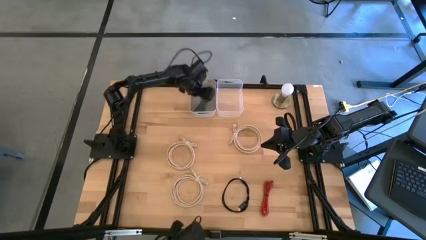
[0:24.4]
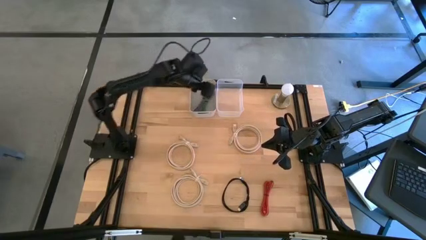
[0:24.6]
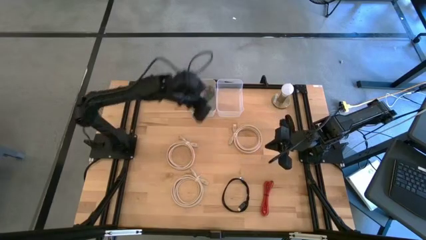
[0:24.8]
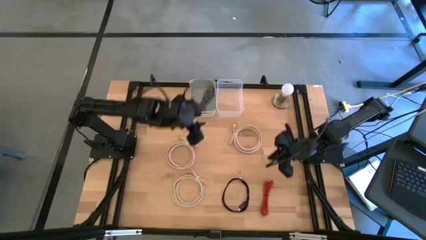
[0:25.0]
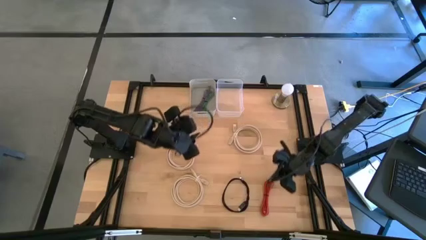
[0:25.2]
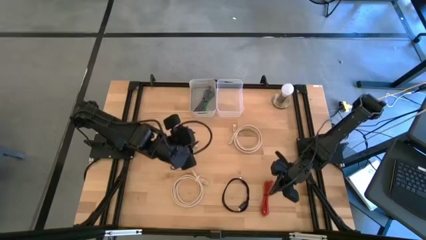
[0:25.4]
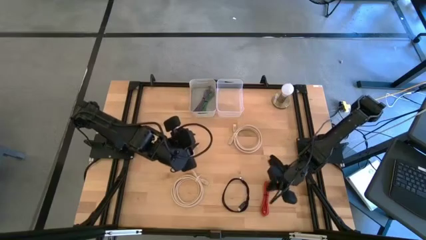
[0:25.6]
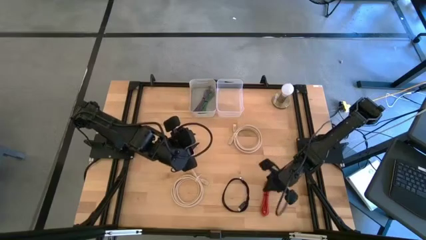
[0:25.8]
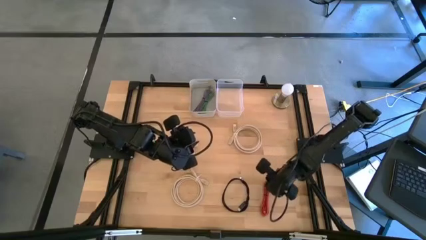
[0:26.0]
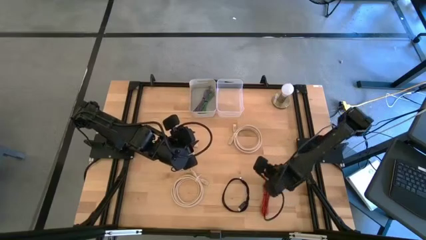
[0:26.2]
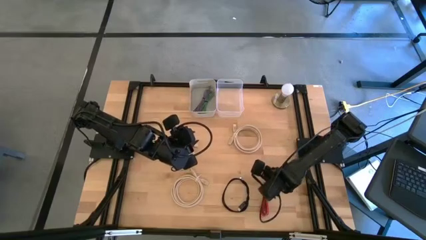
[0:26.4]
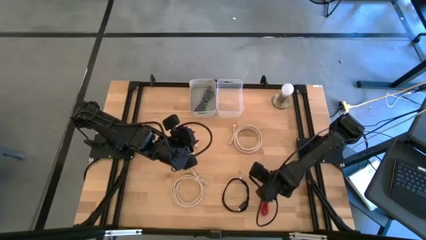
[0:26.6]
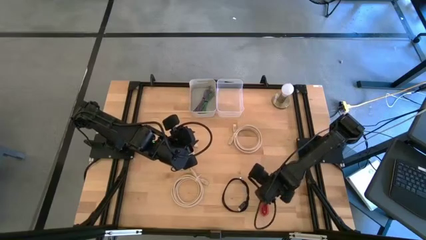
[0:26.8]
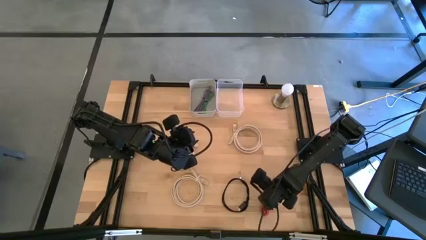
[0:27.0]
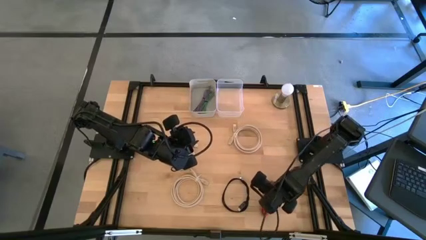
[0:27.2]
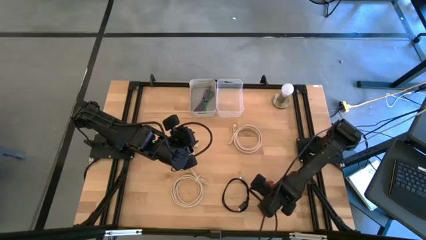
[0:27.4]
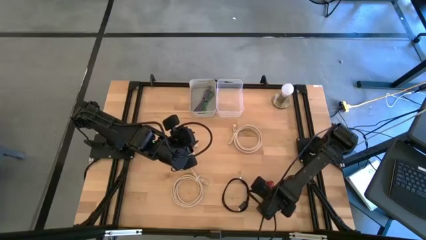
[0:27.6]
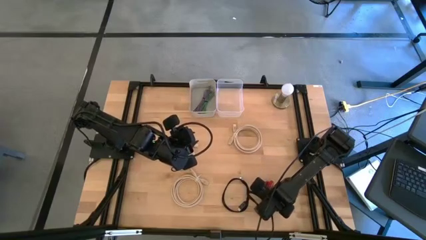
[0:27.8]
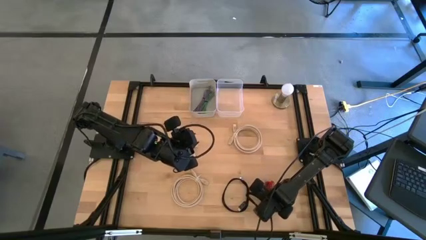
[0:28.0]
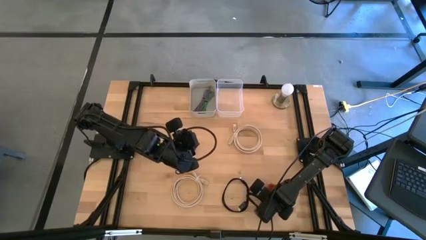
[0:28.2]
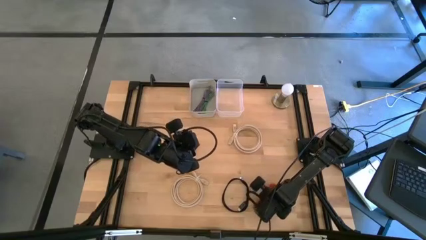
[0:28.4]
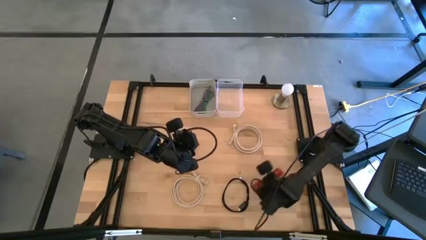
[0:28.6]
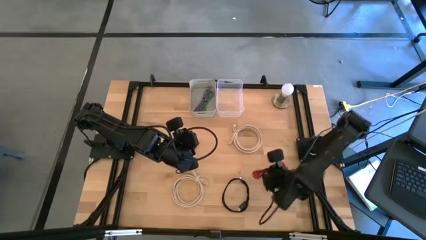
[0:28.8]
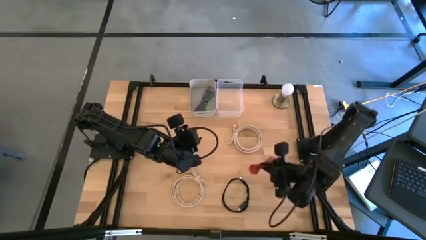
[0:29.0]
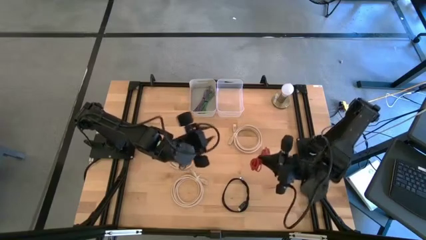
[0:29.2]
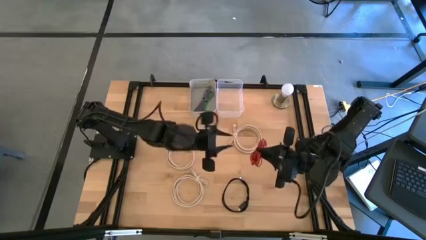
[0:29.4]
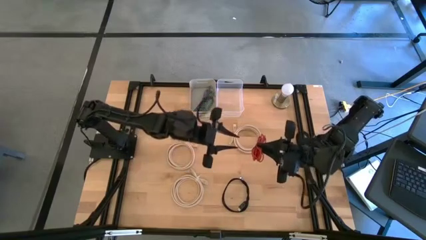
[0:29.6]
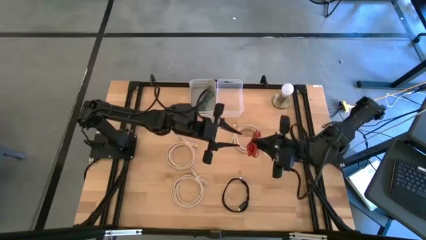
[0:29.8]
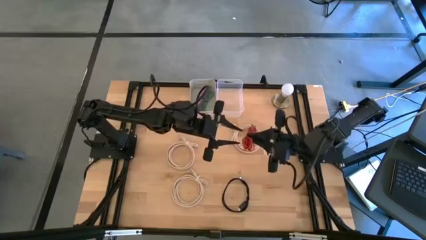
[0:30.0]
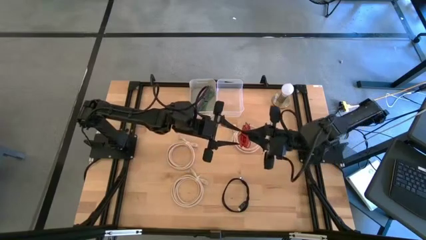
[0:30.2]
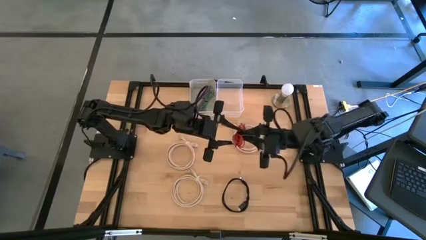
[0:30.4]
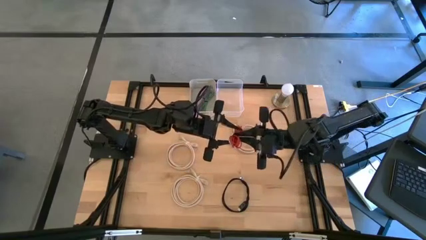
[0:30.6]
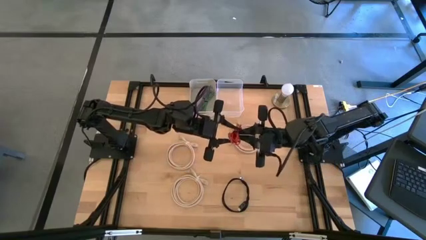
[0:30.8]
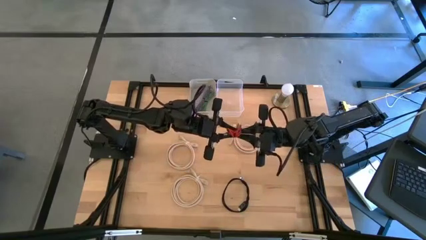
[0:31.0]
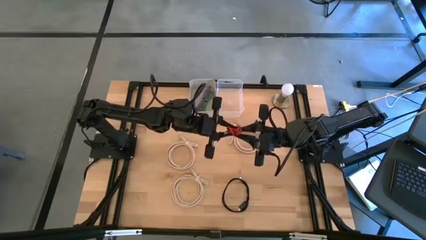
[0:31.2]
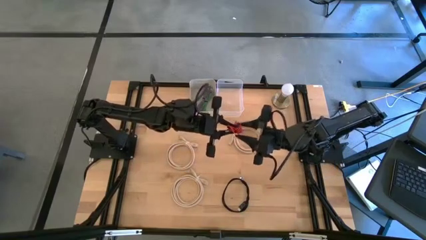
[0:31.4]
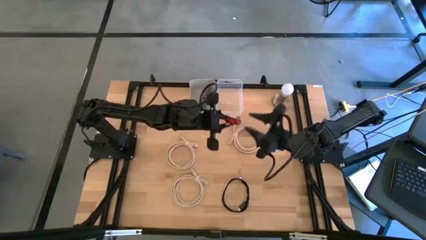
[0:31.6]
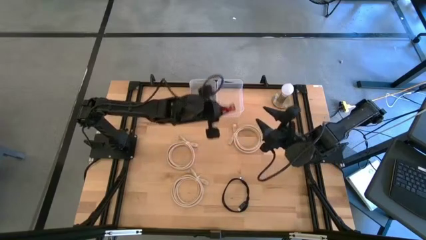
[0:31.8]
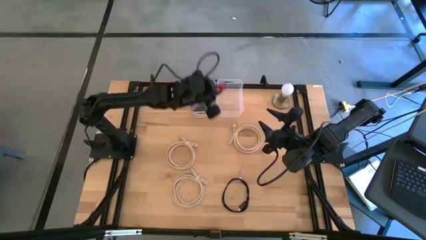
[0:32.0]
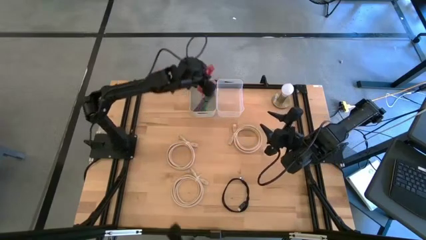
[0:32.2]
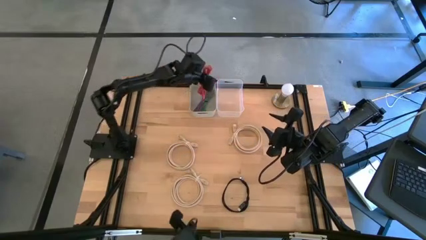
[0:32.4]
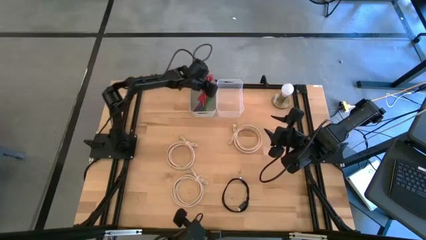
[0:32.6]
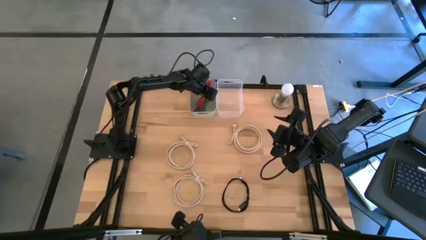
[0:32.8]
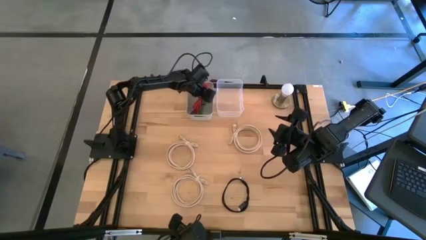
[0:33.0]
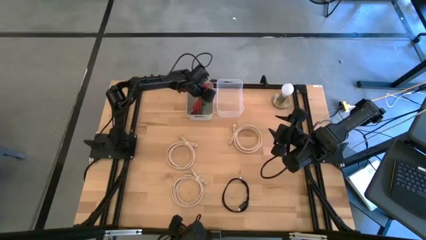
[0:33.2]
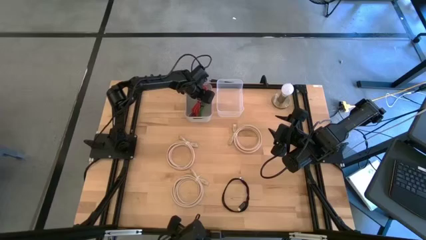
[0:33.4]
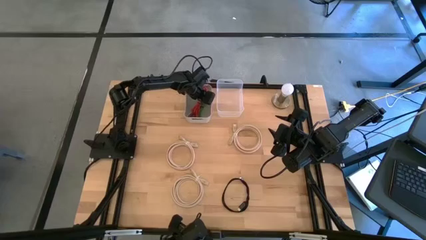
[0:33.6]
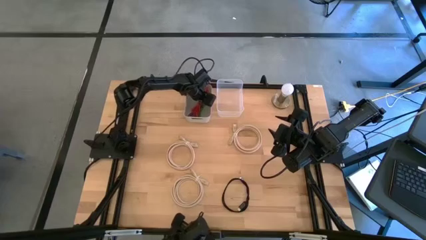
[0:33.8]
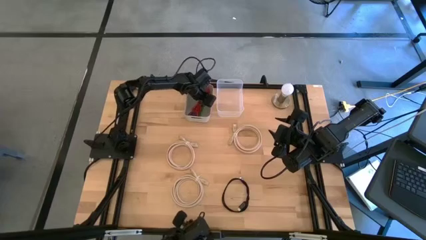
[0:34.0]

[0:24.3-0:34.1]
Task: Pick and place USB-C Cables
Put the red charger cable into the gray bin

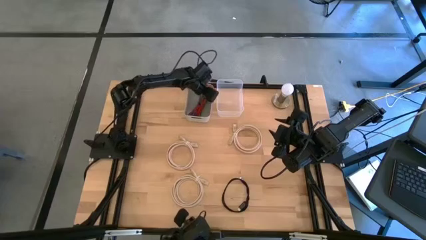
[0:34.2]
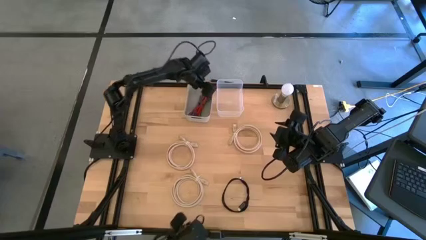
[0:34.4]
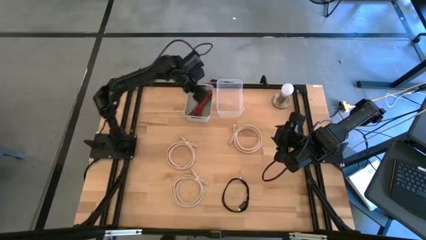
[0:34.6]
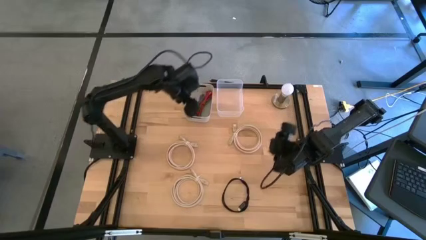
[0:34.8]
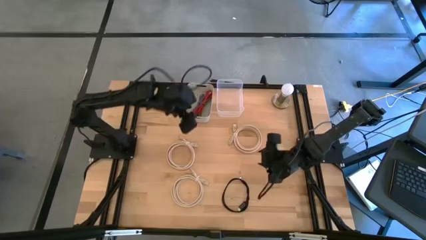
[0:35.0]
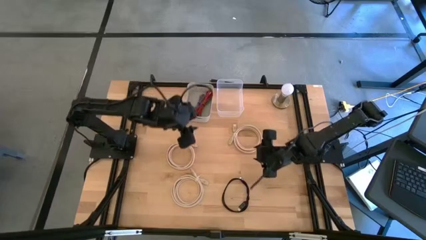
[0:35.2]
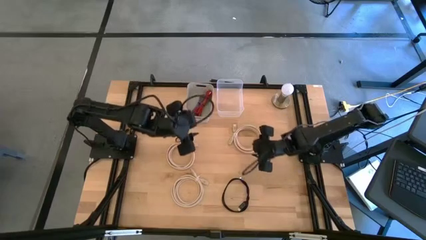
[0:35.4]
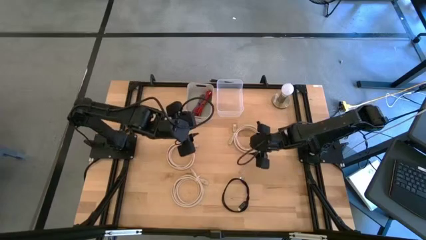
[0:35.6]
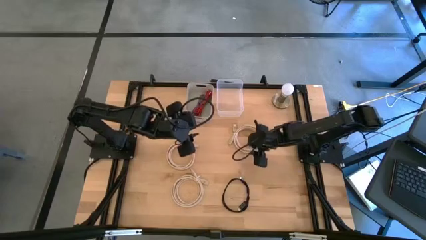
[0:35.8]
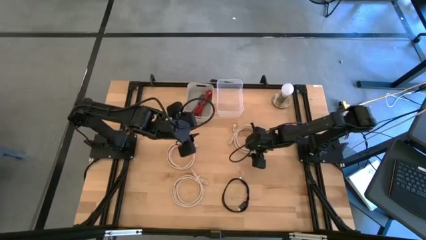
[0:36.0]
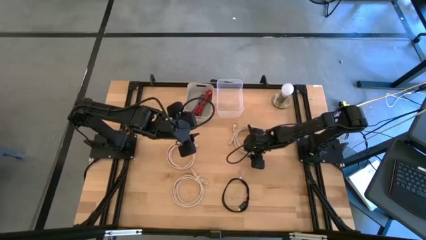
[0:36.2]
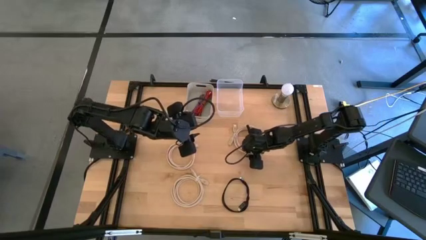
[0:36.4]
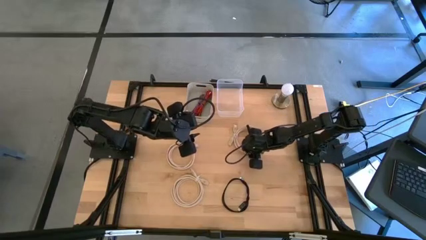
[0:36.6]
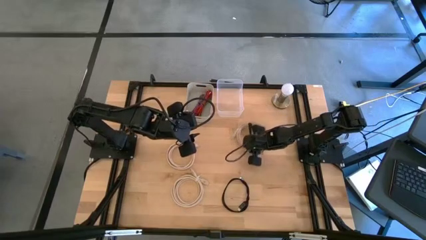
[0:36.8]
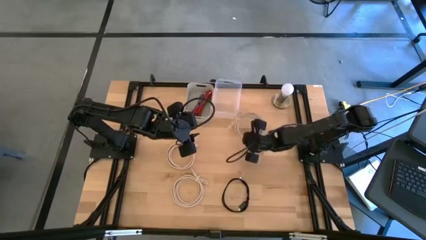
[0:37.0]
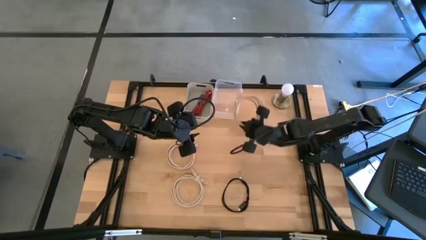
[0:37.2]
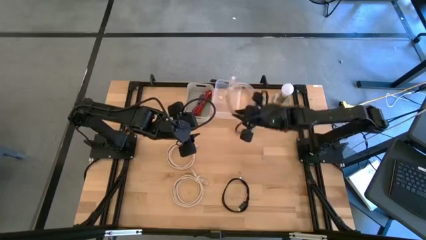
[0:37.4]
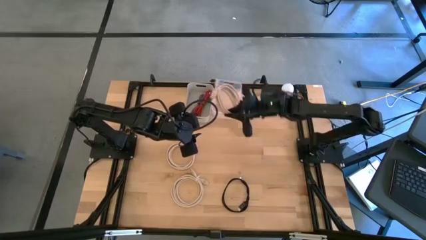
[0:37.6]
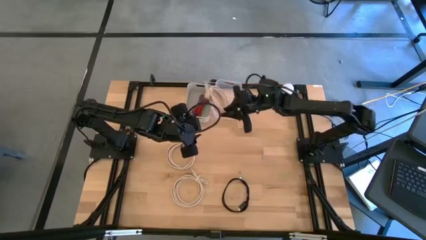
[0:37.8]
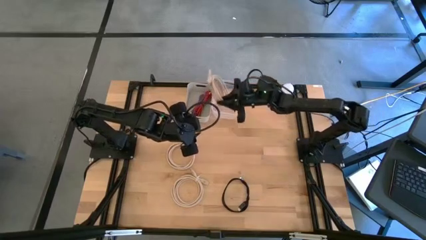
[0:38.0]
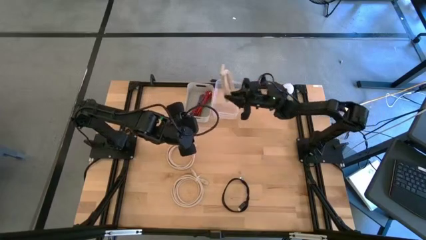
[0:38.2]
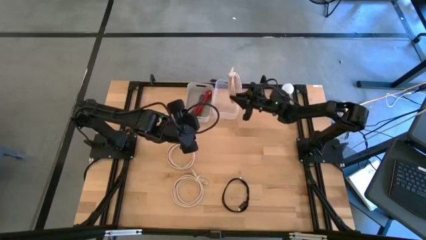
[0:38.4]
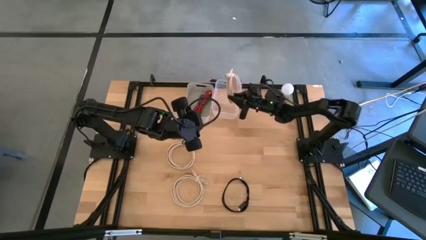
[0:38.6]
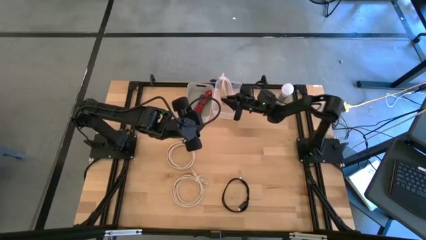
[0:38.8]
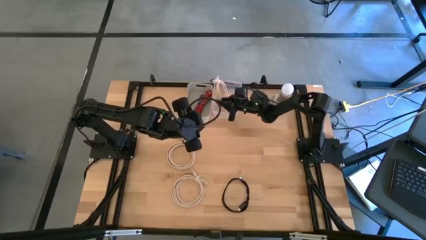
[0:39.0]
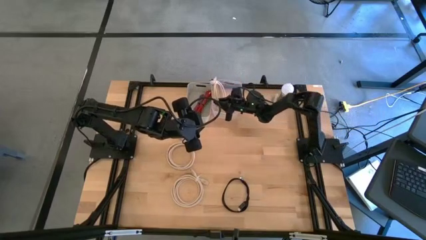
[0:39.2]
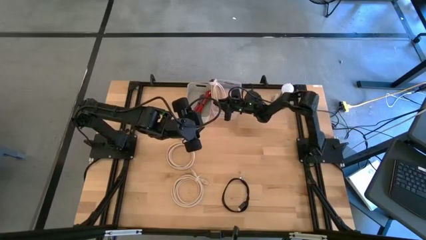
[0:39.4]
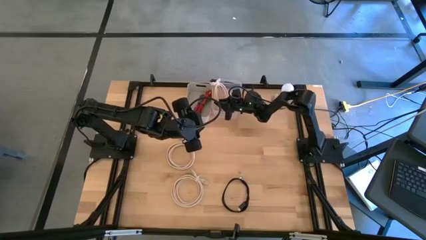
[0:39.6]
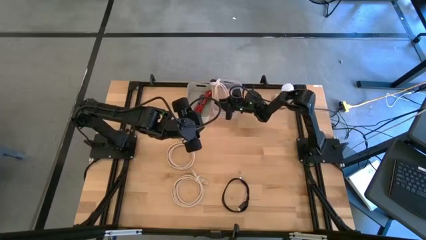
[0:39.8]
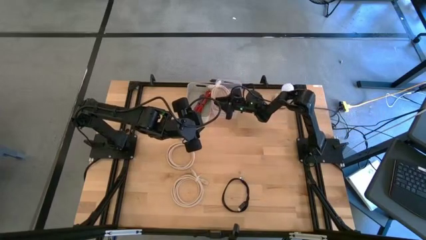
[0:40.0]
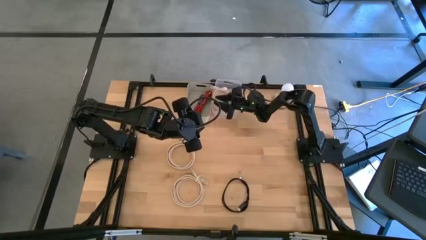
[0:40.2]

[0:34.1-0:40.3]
Put the top right gray USB cable into the transparent bin
